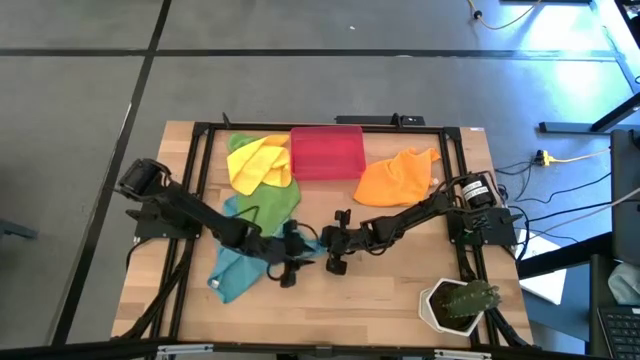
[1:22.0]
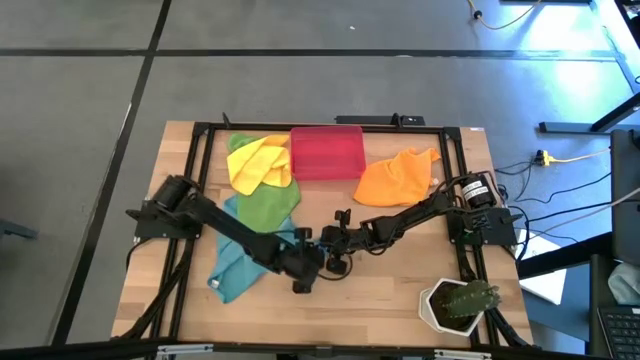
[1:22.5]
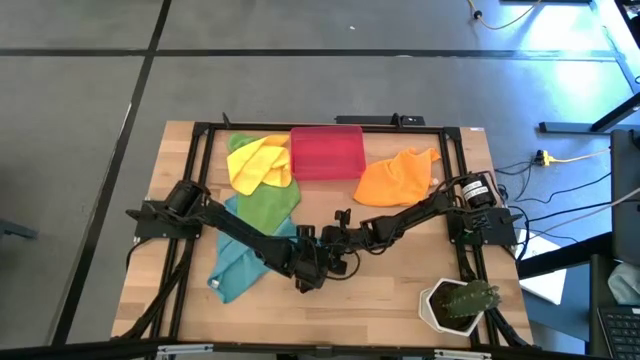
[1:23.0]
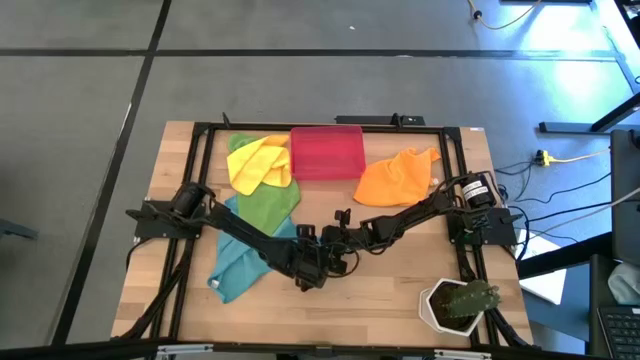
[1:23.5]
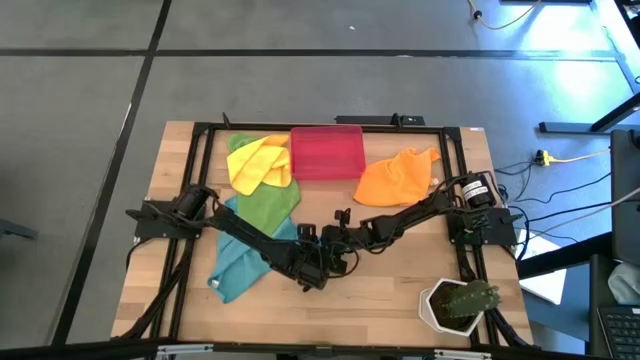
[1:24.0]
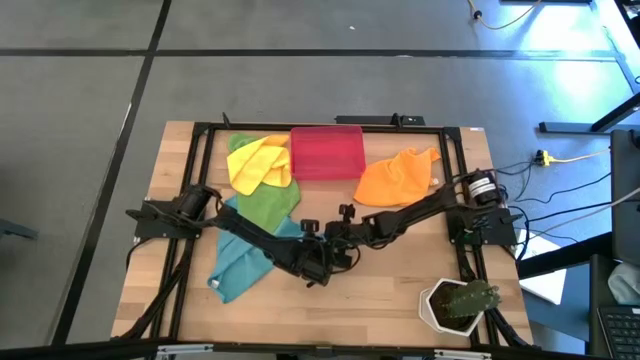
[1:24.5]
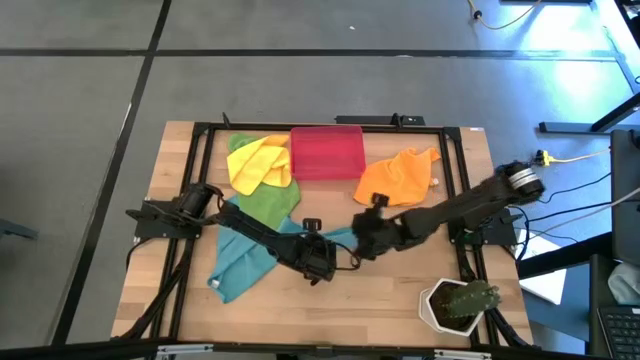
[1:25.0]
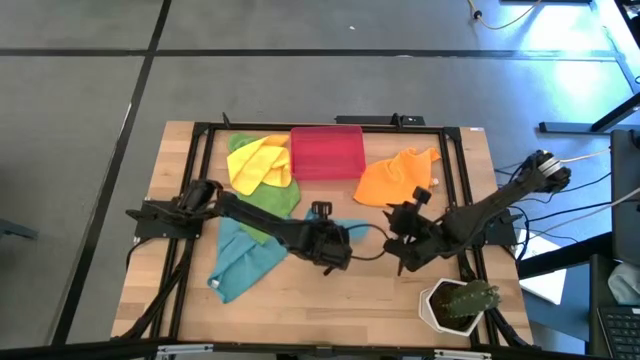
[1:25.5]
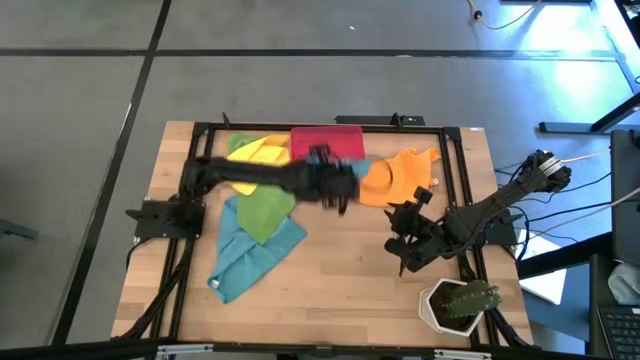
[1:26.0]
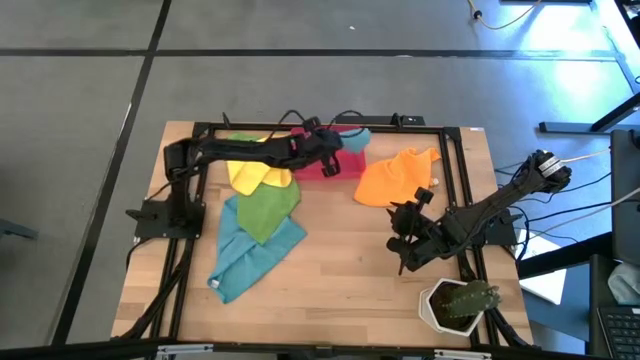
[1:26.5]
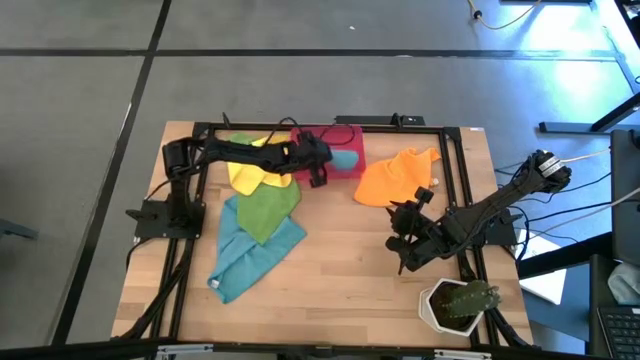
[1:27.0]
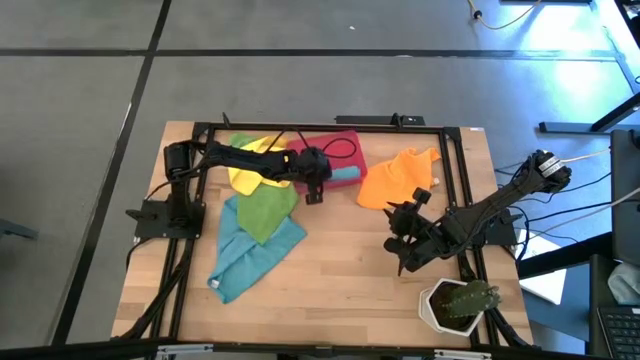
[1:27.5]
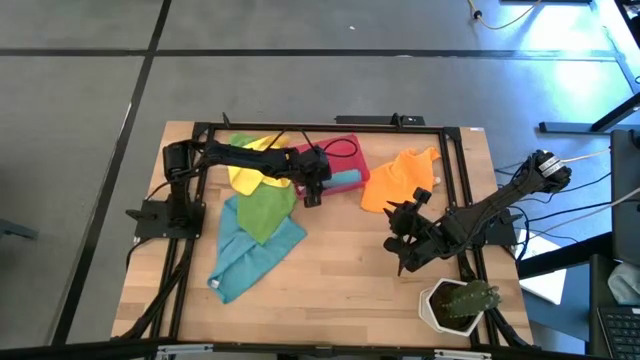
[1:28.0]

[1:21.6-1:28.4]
Task: Roll microfiber towels into tight, uniform cylinder then place into a basket
Put the right blue microfiber towel into the red bin

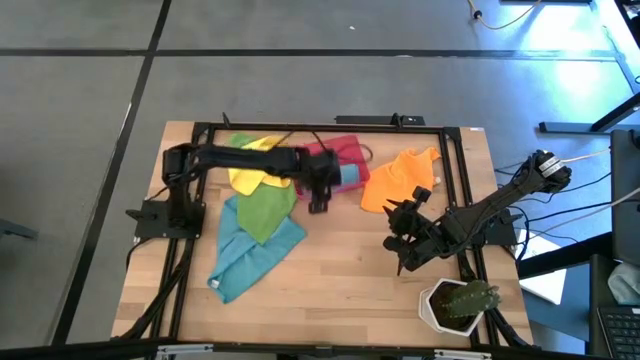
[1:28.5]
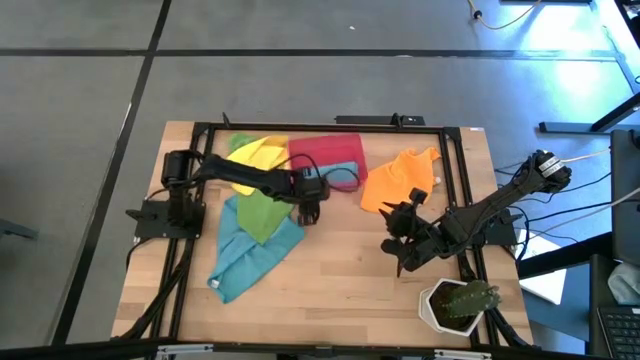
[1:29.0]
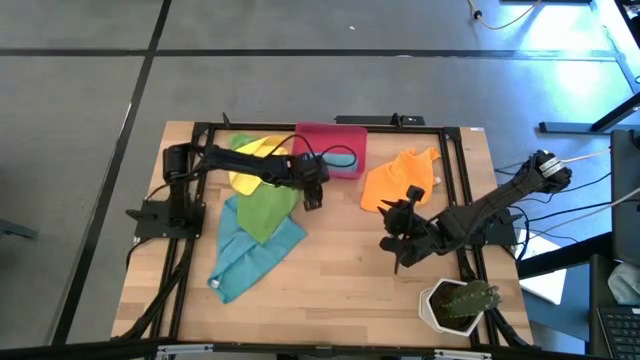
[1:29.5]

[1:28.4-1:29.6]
Adjust the red bin

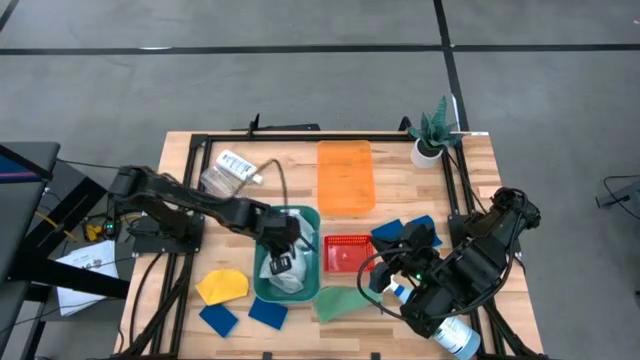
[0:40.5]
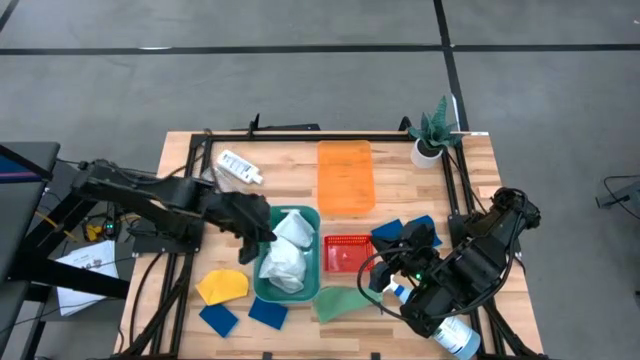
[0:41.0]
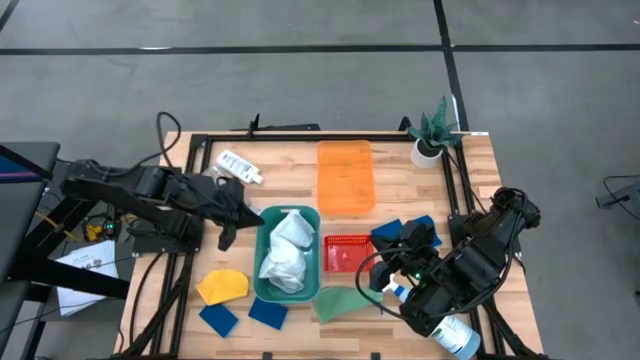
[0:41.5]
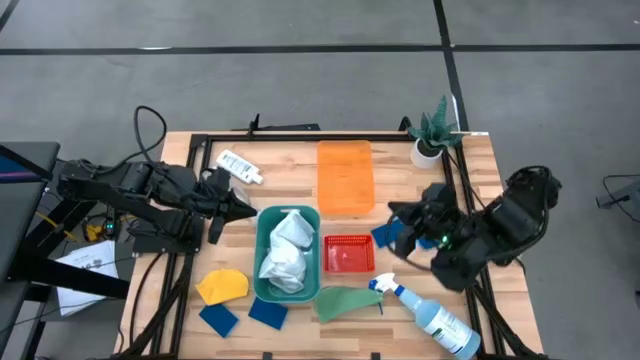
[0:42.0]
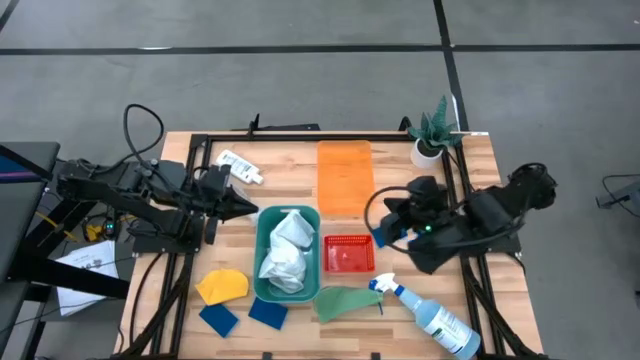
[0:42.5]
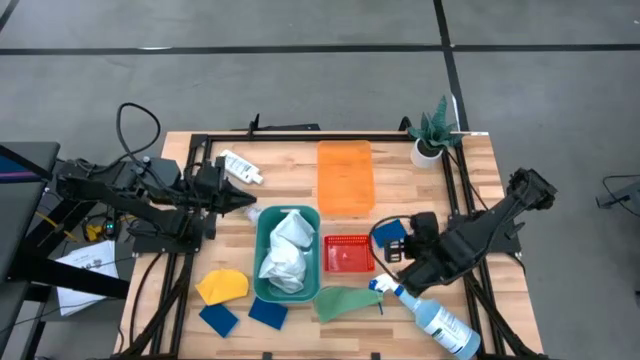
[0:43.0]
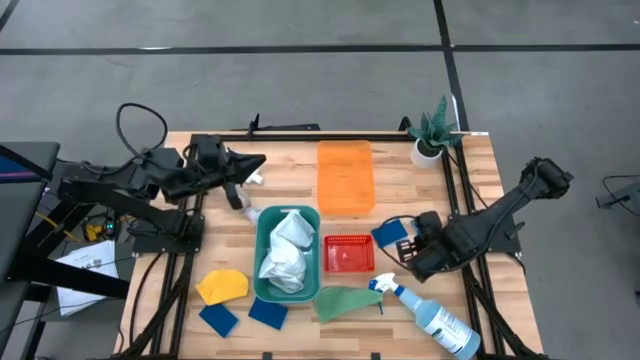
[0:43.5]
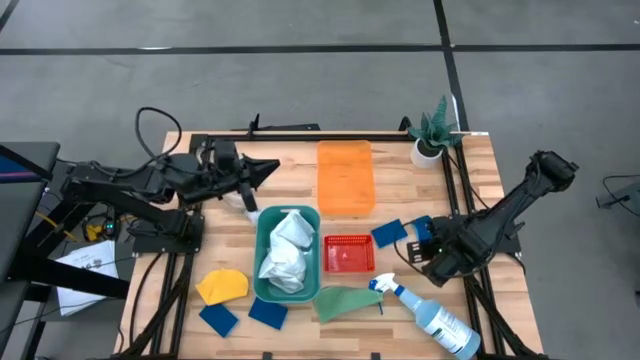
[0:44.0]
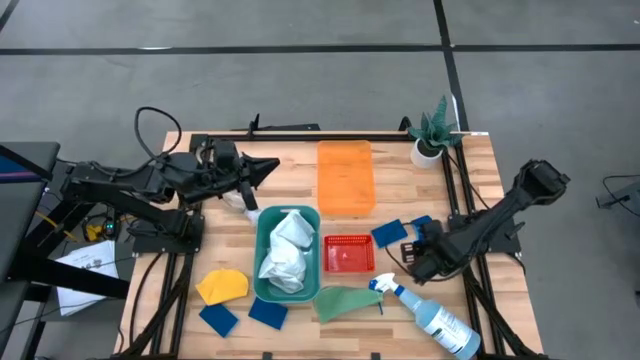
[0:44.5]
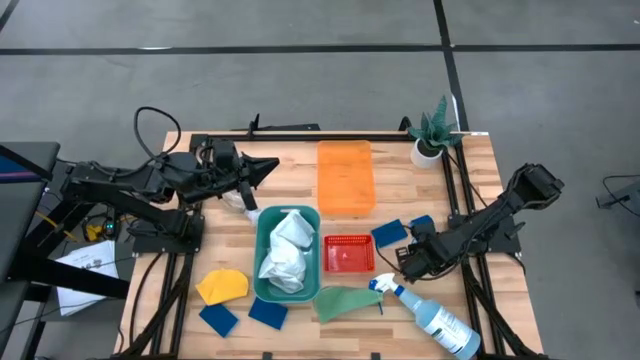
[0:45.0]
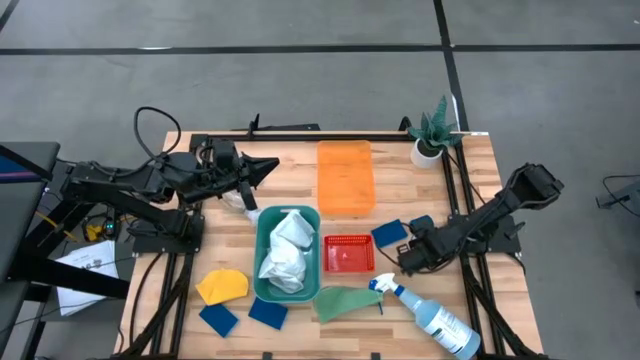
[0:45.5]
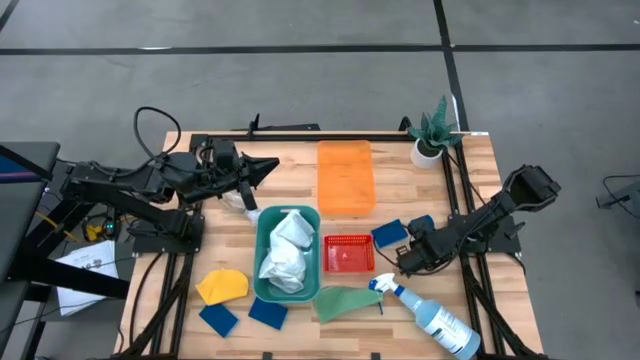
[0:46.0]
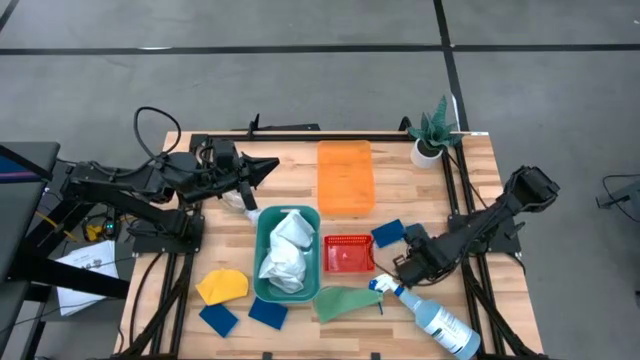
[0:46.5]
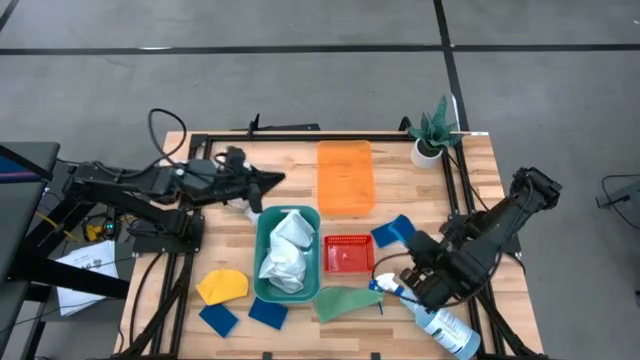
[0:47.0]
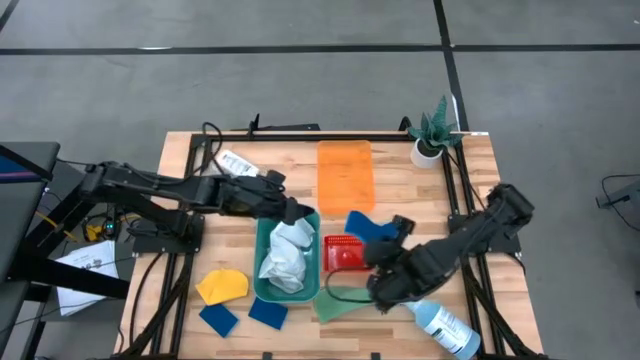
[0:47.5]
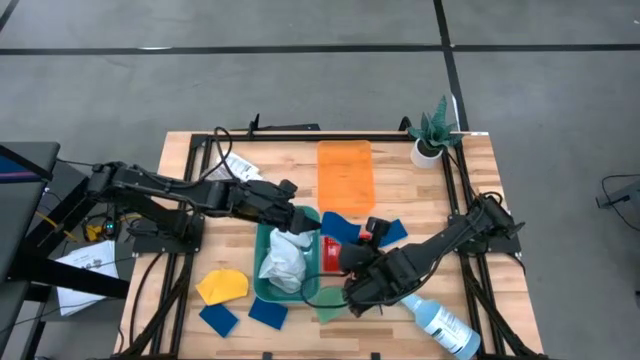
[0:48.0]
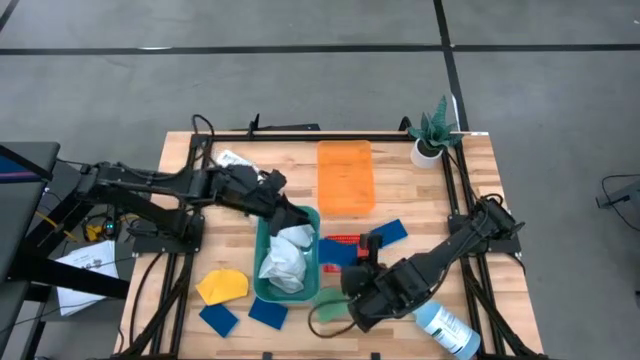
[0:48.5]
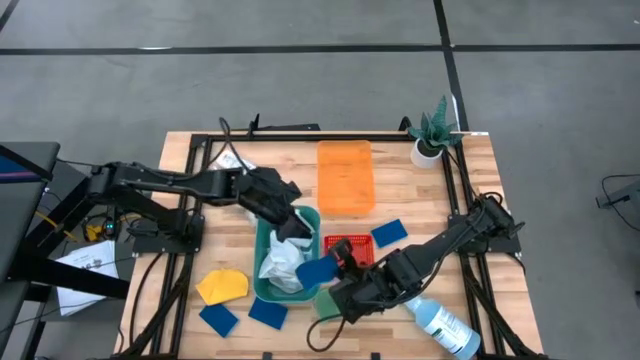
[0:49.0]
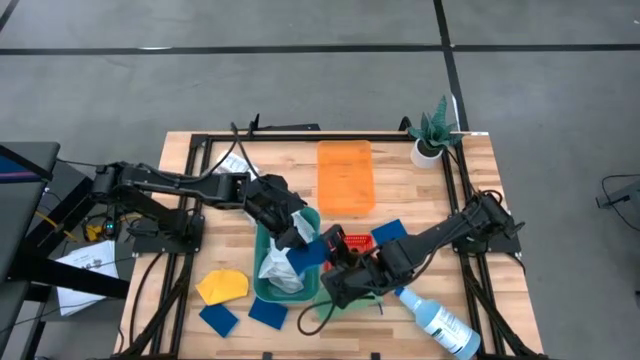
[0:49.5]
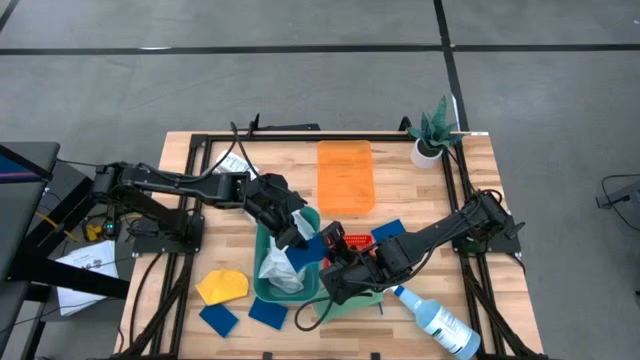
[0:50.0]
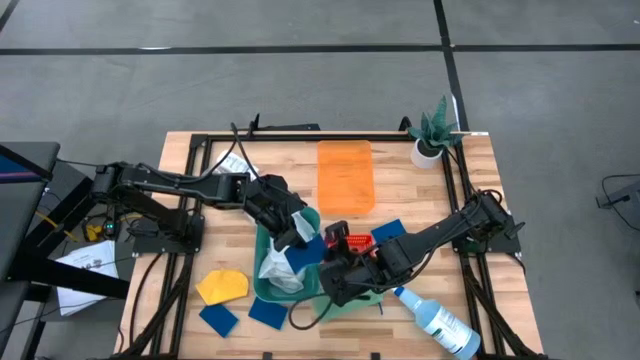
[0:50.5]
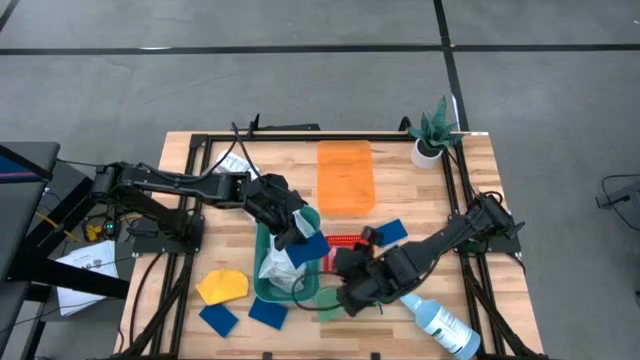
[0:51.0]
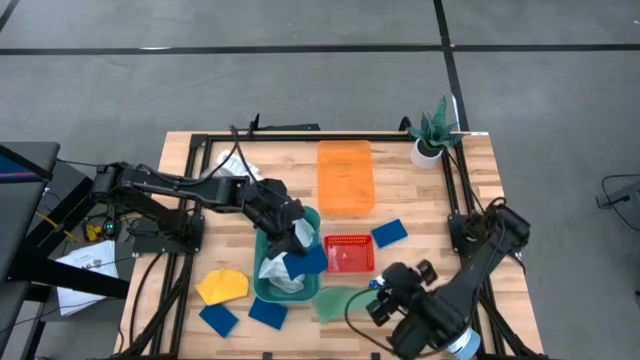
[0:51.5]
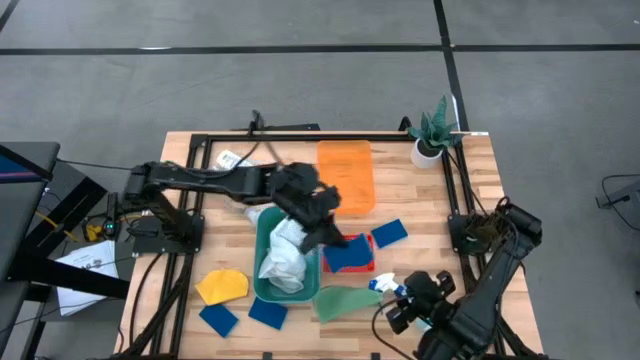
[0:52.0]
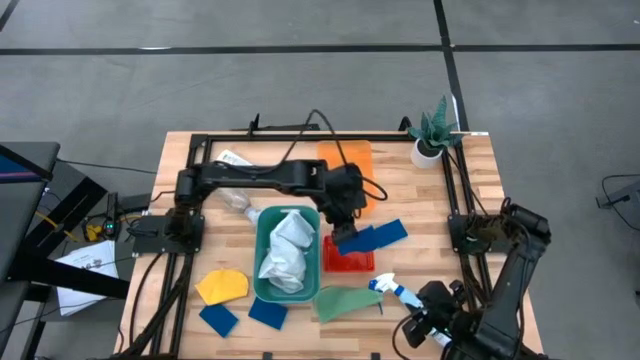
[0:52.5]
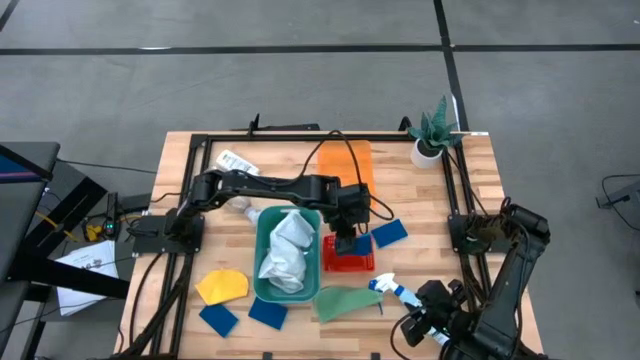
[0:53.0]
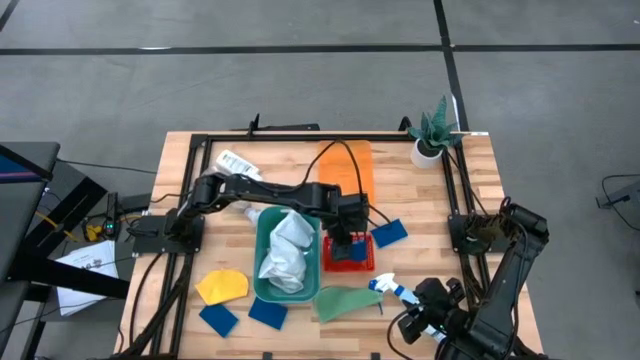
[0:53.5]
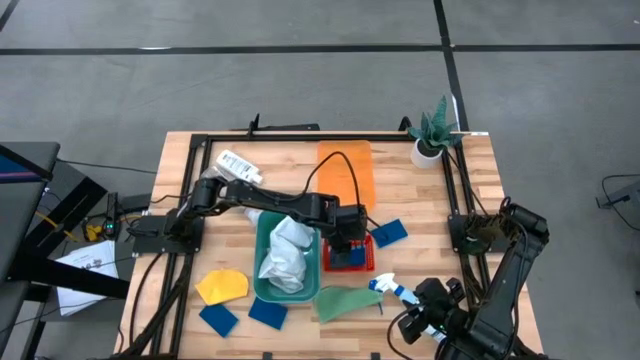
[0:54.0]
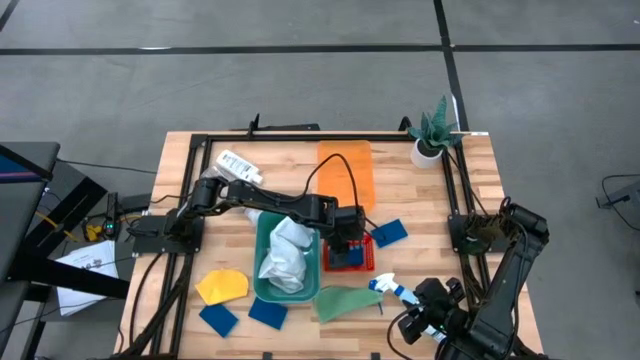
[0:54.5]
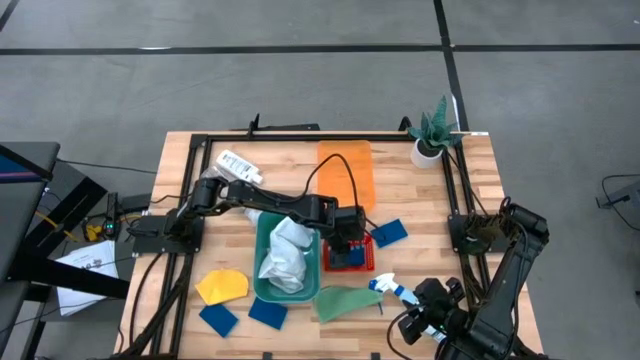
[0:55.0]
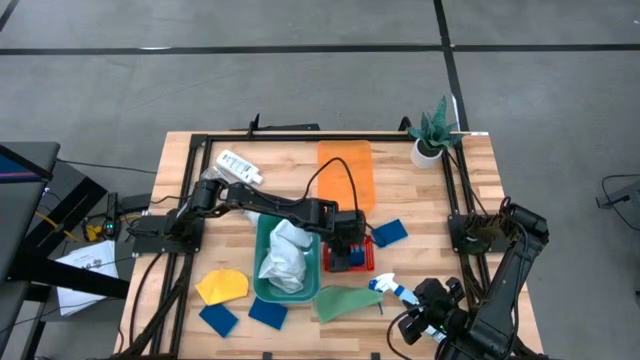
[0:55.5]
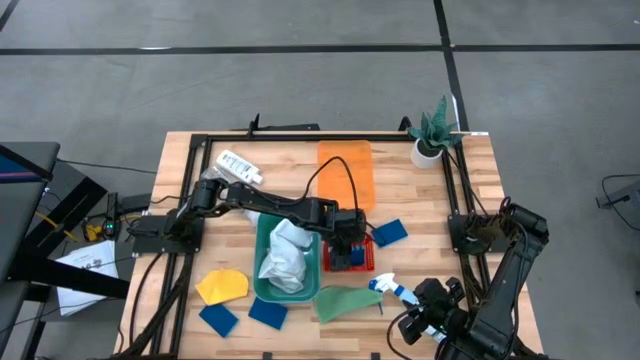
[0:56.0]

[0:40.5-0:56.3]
Task: Pick & Place Kitchen Items
Put the blue sponge into the red bin
